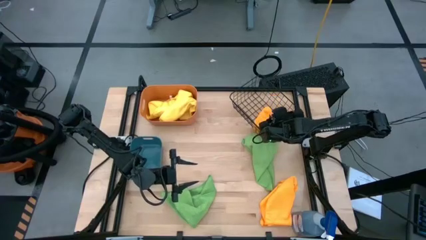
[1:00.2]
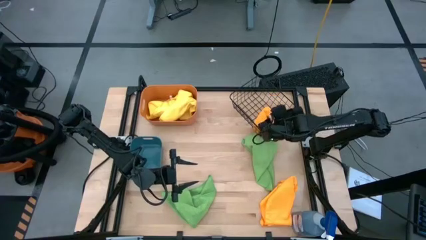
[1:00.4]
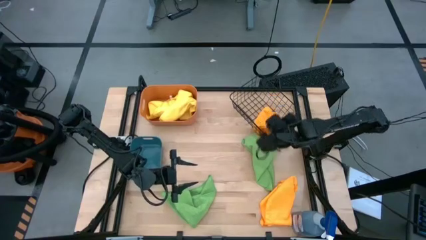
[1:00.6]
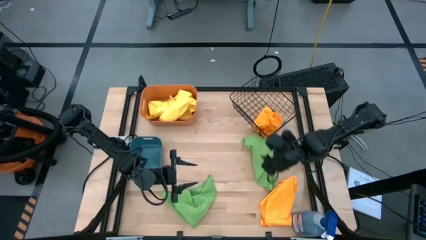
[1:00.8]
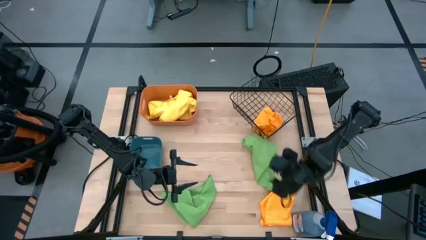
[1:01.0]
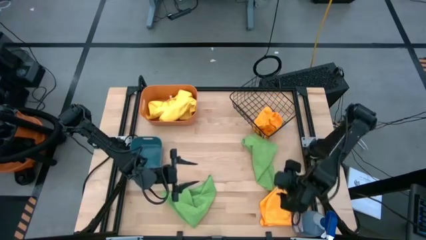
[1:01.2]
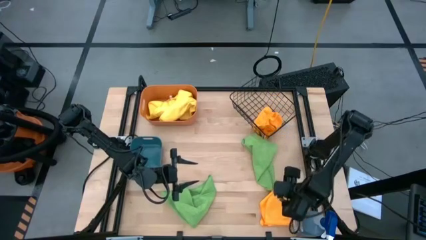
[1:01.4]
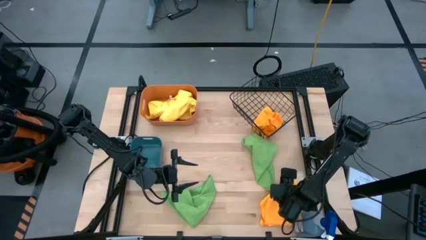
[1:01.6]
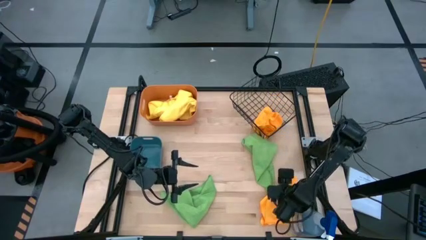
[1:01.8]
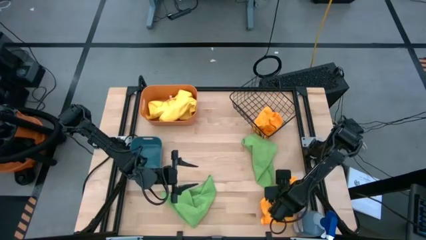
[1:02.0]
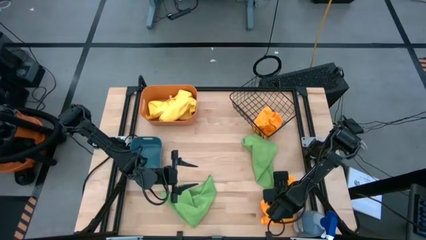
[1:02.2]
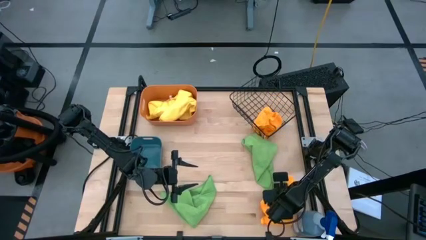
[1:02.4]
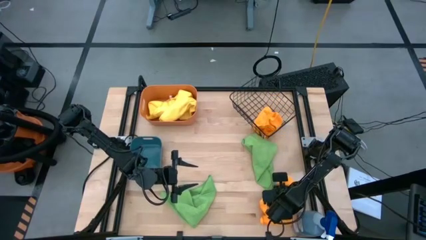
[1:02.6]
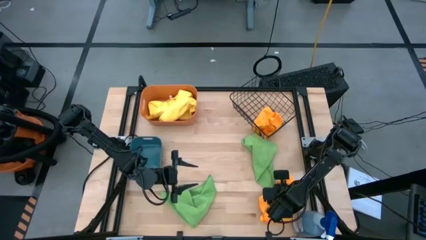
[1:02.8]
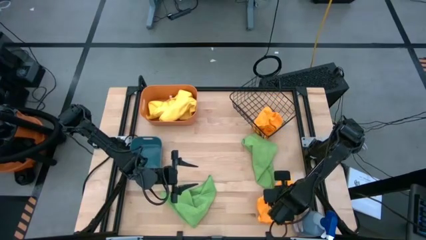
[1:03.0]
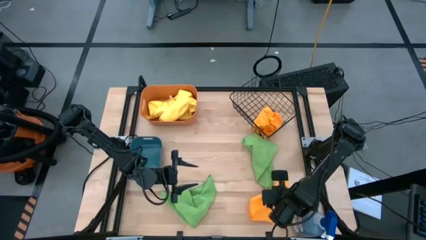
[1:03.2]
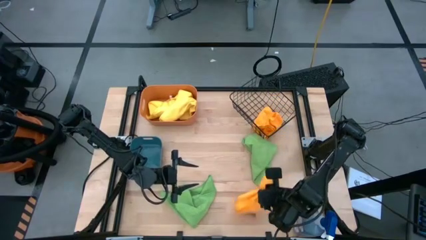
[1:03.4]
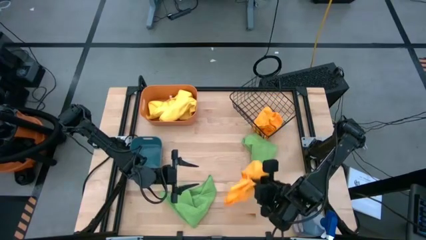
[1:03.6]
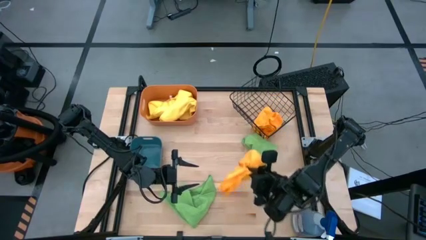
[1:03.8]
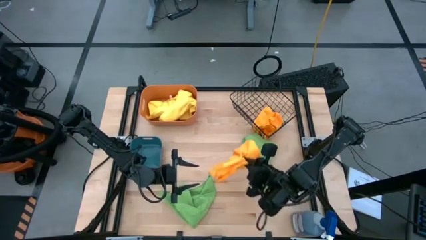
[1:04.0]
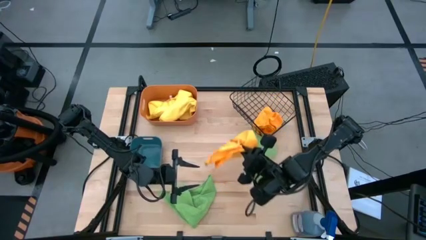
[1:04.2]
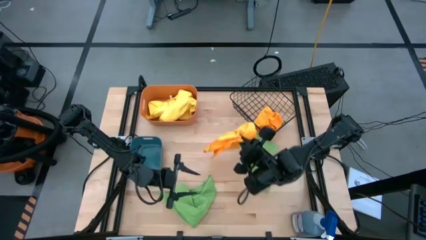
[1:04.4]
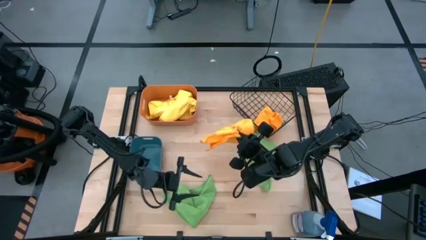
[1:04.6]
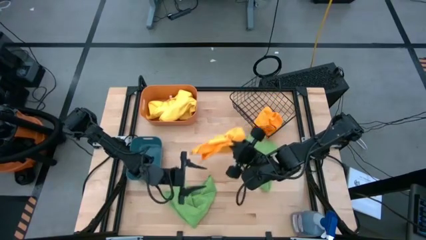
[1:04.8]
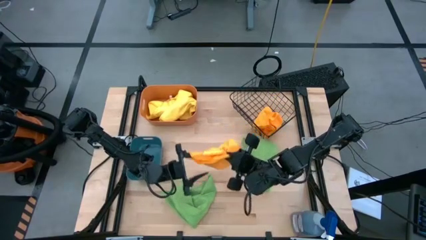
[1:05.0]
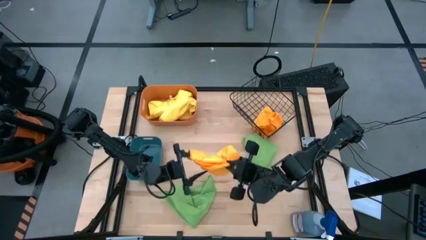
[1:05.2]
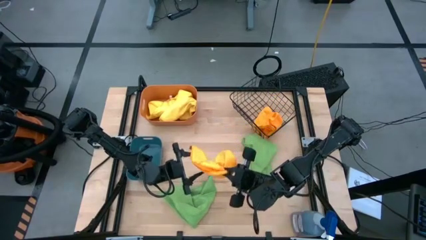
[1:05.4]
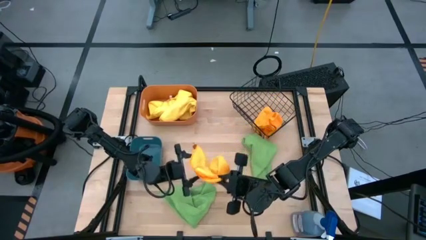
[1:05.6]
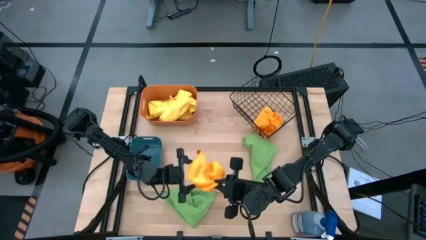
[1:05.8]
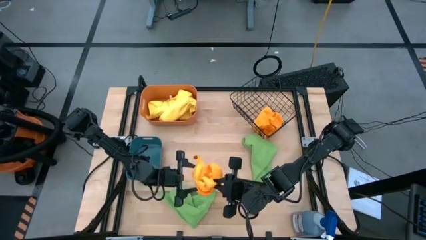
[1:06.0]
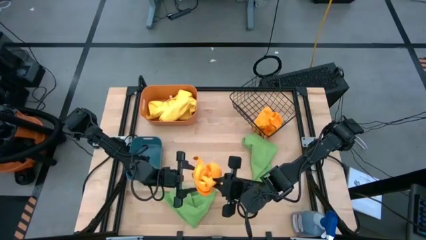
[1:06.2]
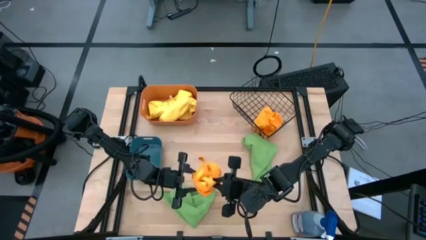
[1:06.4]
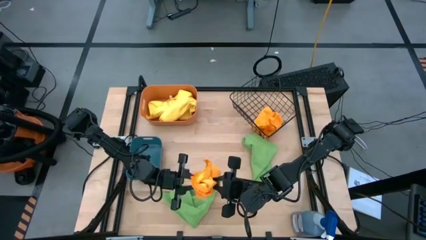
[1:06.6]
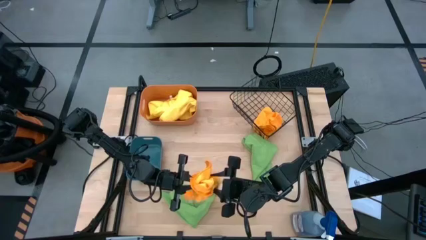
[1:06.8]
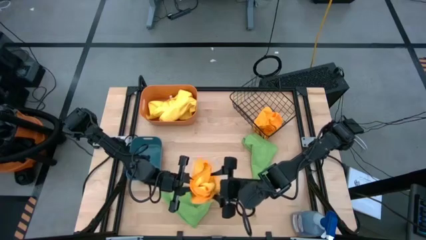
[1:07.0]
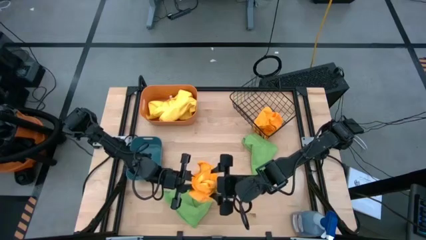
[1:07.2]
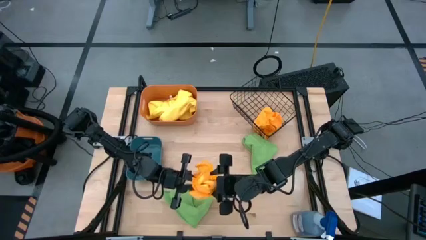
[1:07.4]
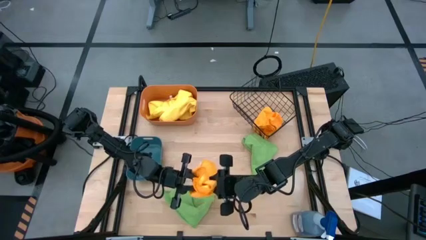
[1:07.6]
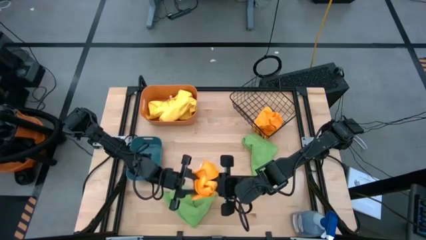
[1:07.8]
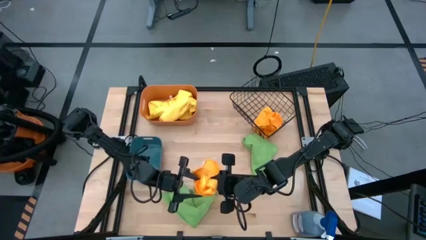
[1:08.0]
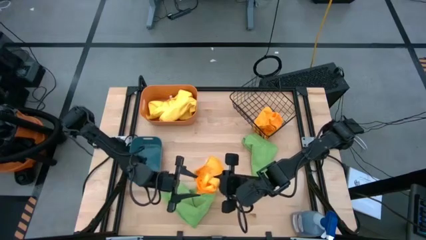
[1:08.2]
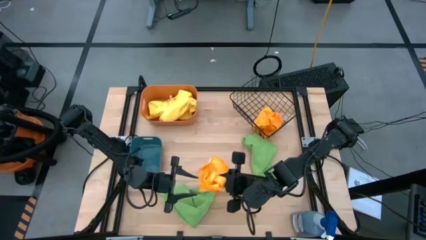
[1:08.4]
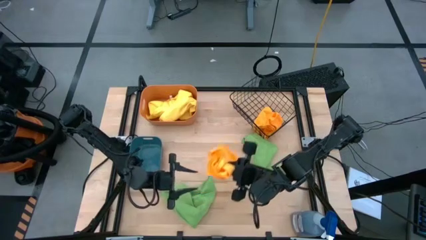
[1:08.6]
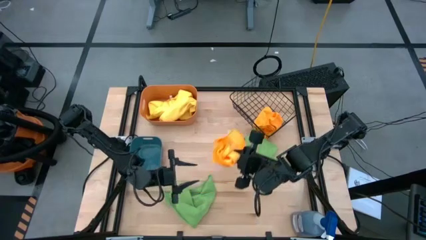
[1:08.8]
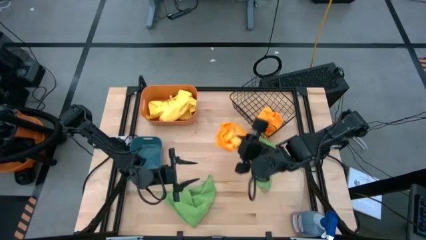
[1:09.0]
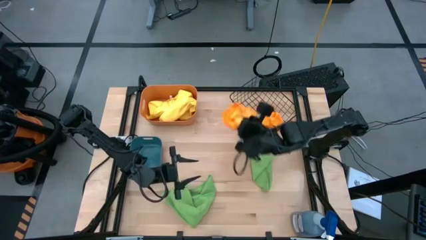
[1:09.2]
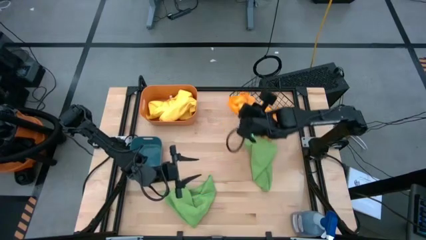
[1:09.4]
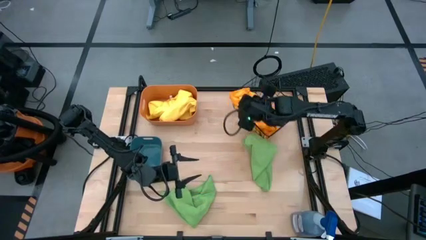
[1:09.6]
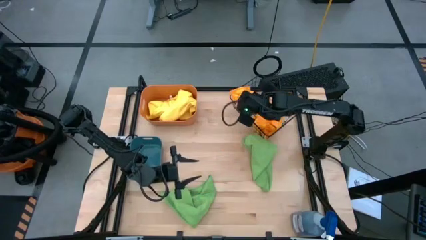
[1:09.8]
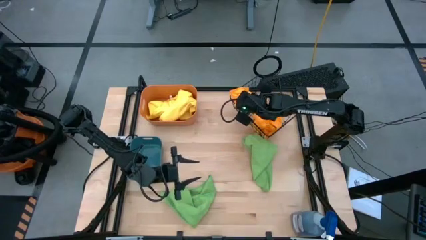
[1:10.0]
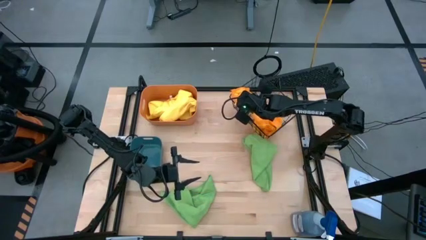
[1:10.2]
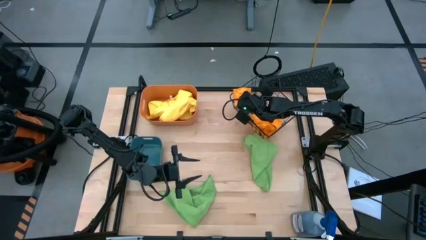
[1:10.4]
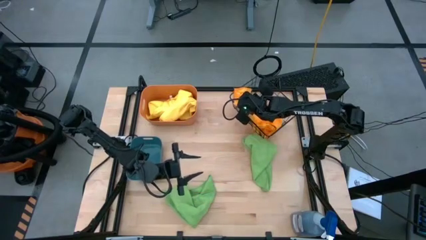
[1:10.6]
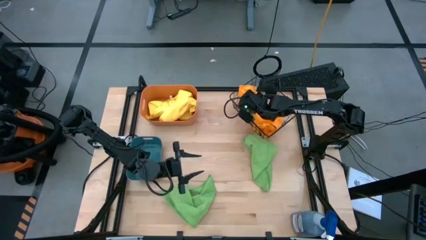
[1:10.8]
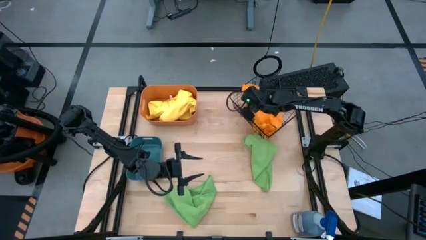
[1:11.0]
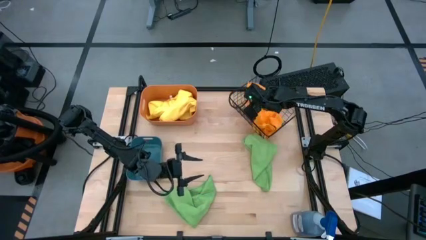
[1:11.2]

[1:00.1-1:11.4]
Task: Sort microfiber towel by color & place in baskets
Put the orange microfiber towel into the metal wire basket
